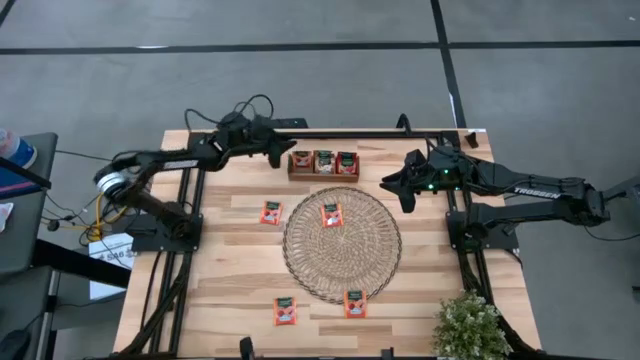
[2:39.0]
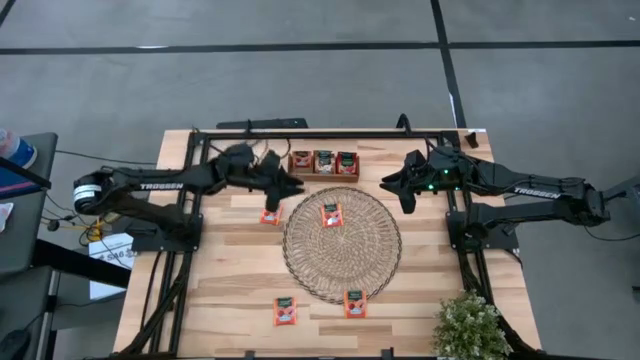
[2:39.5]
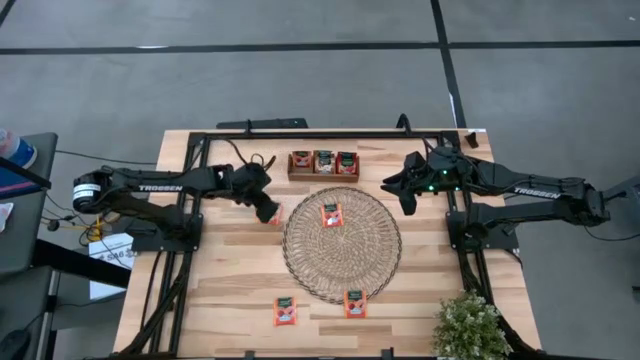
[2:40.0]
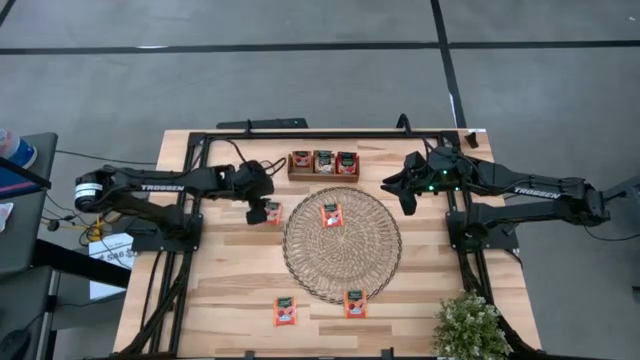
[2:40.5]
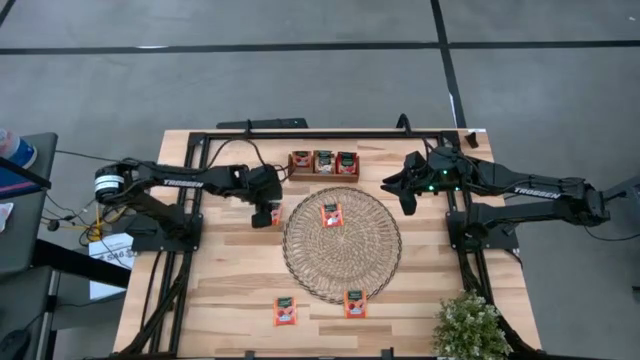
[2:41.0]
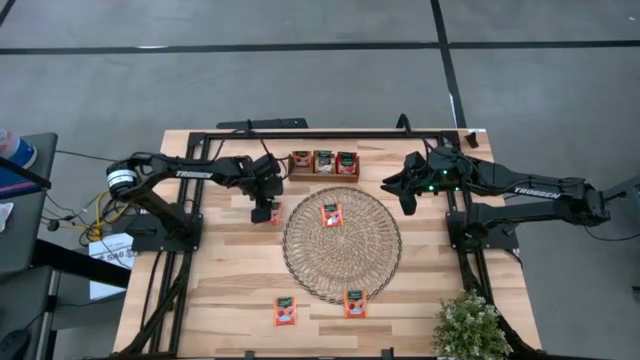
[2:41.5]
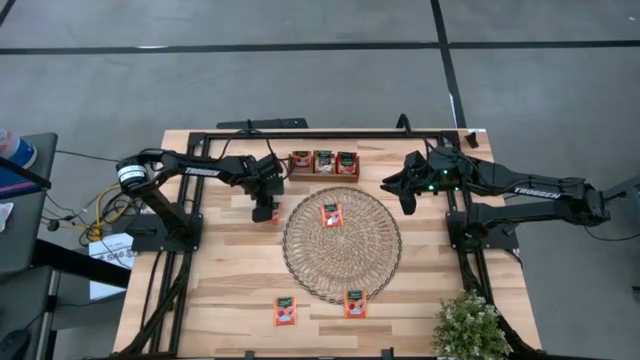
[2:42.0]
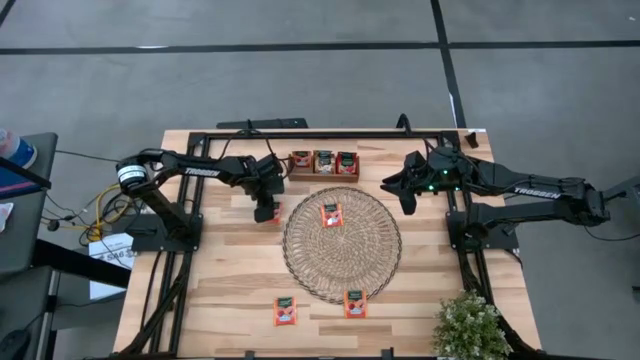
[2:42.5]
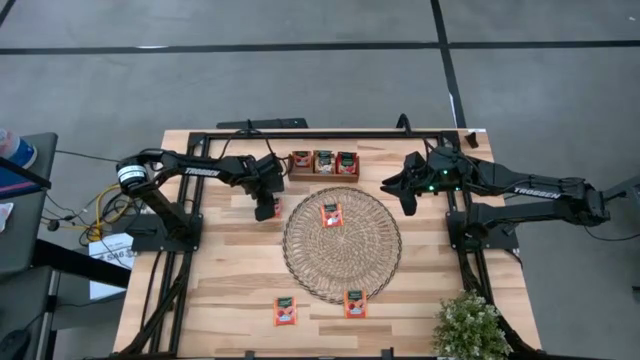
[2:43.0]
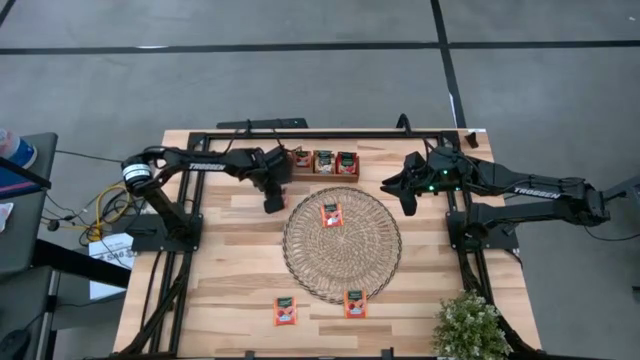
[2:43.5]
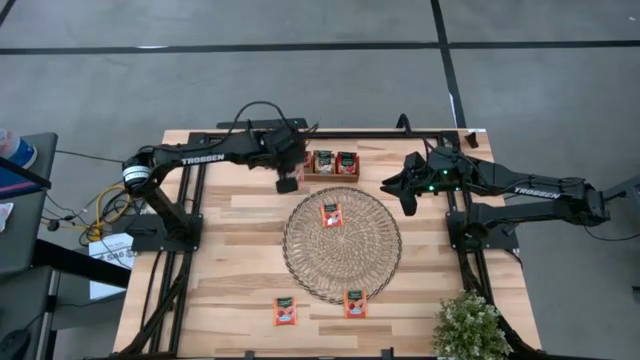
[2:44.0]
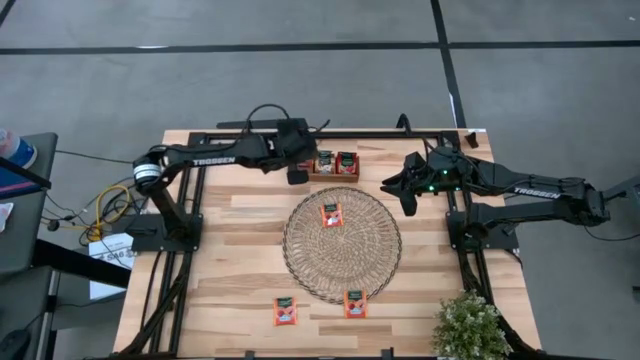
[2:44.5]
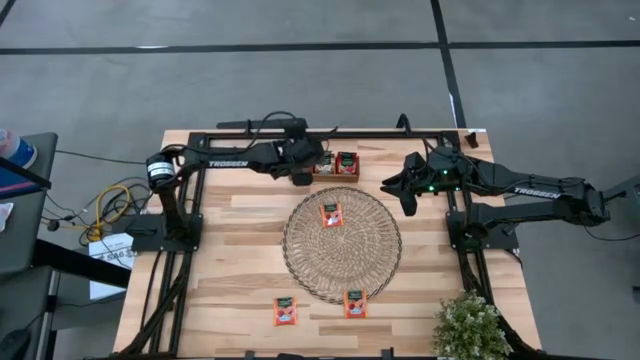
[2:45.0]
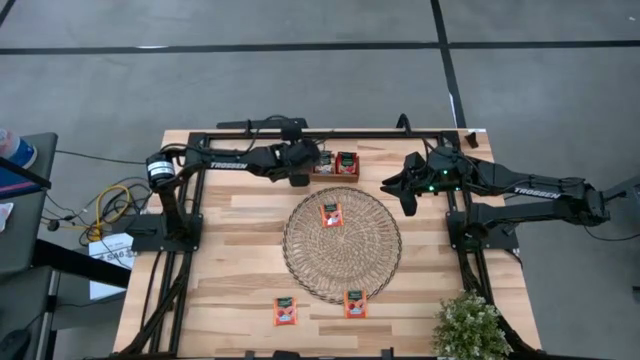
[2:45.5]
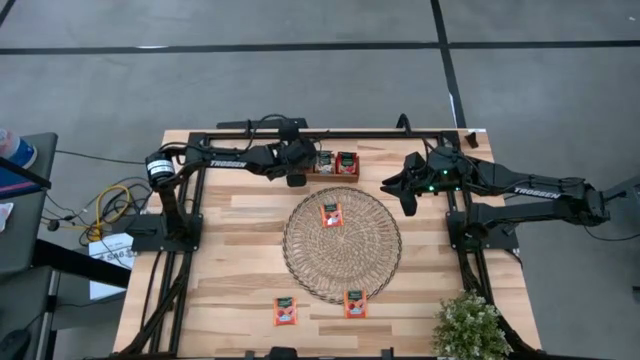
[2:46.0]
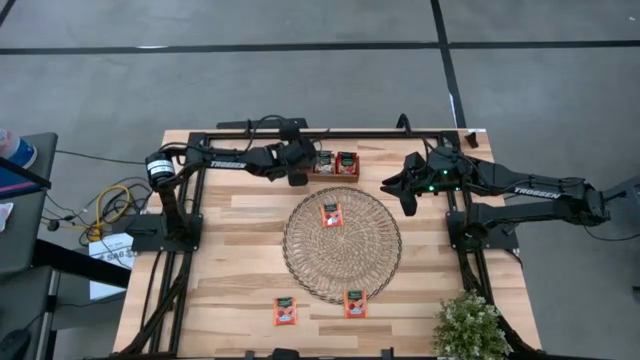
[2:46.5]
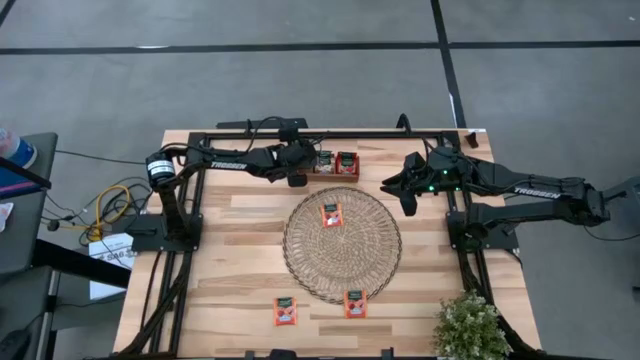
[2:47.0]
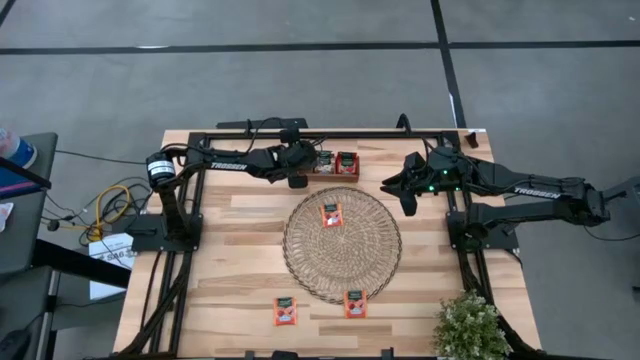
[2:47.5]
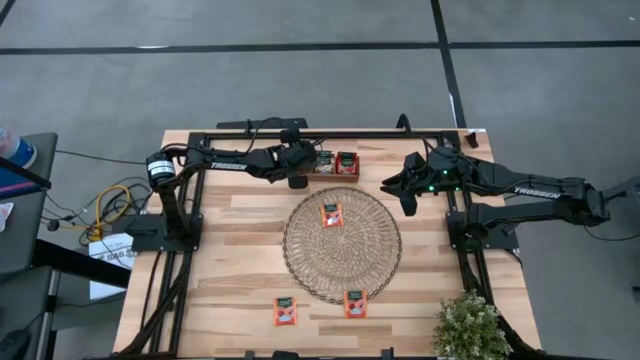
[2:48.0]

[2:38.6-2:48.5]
Task: Pick & Place Tea
Put the orange tea bag into the left section of the brown wooden organizer

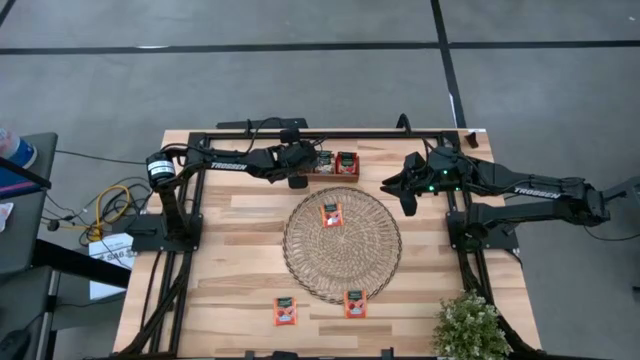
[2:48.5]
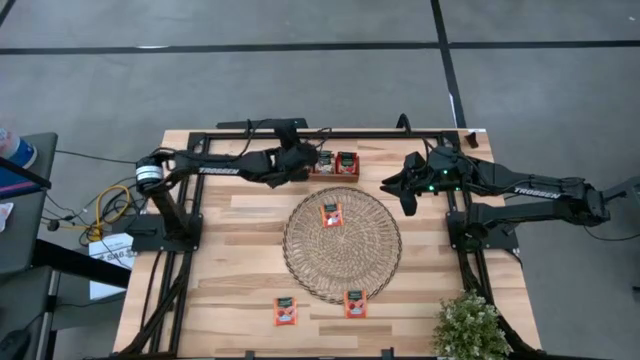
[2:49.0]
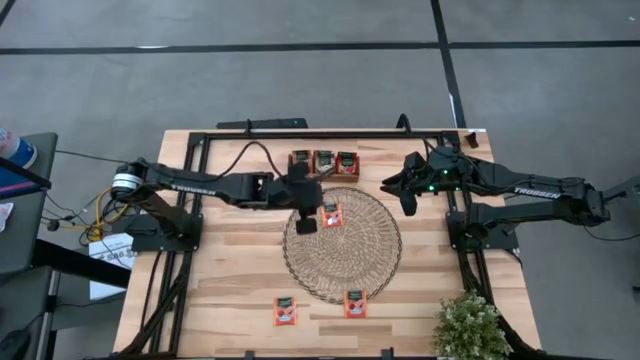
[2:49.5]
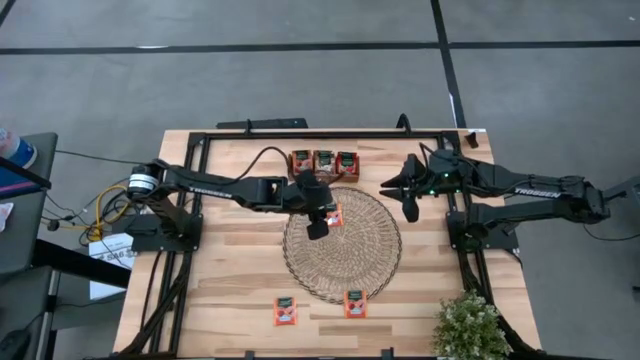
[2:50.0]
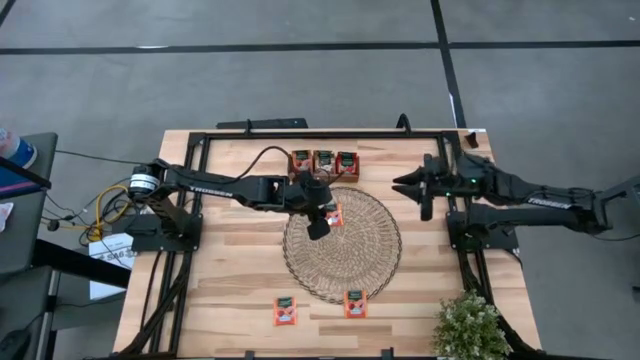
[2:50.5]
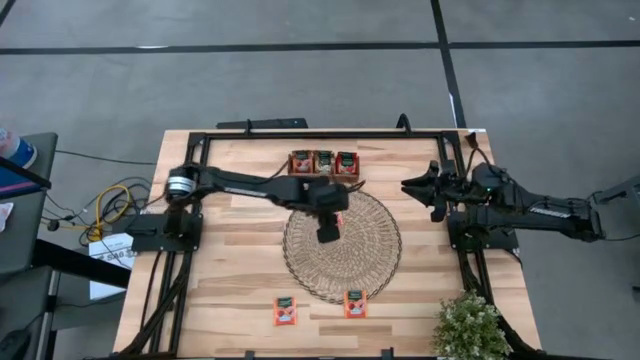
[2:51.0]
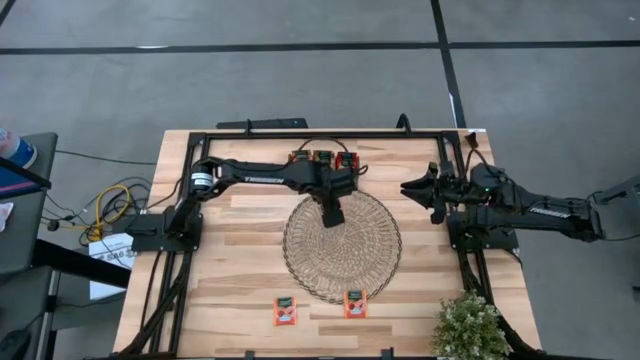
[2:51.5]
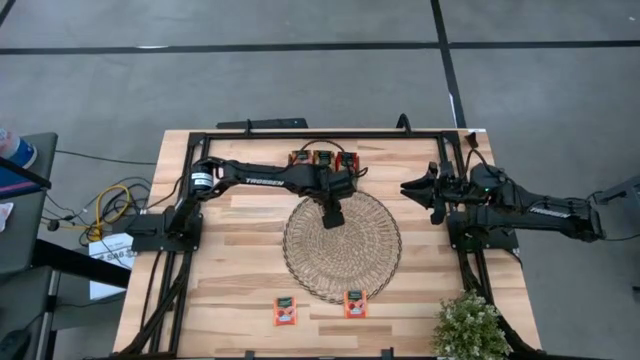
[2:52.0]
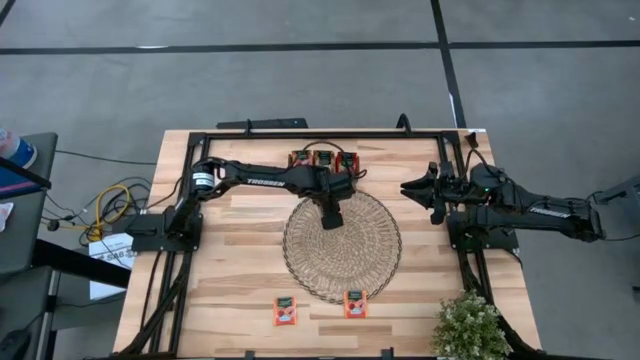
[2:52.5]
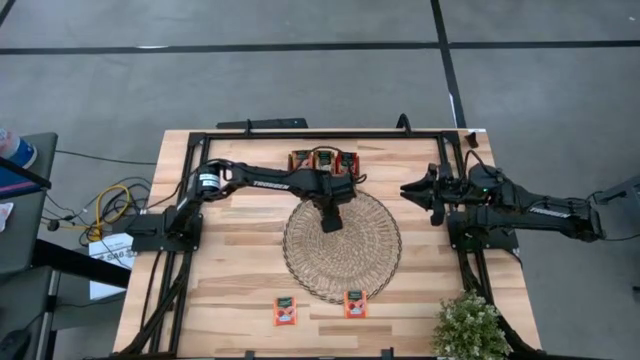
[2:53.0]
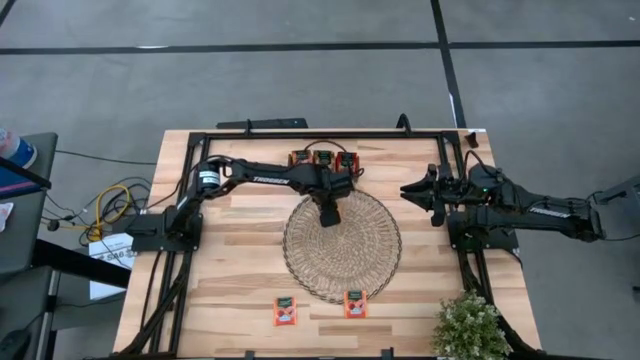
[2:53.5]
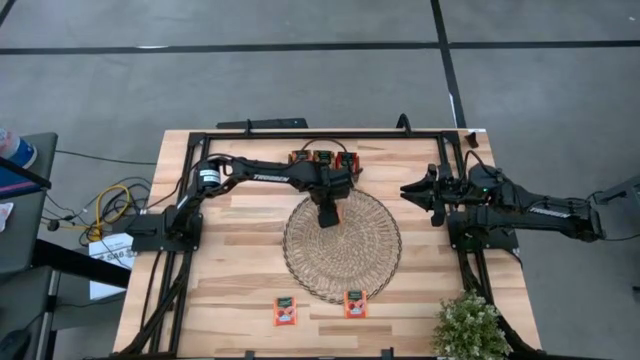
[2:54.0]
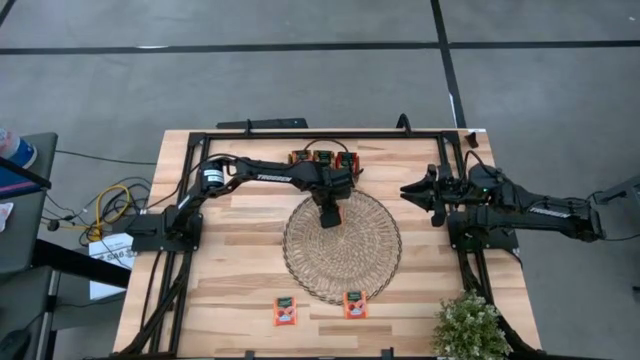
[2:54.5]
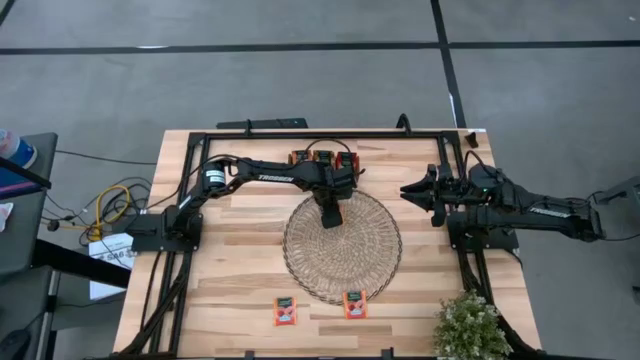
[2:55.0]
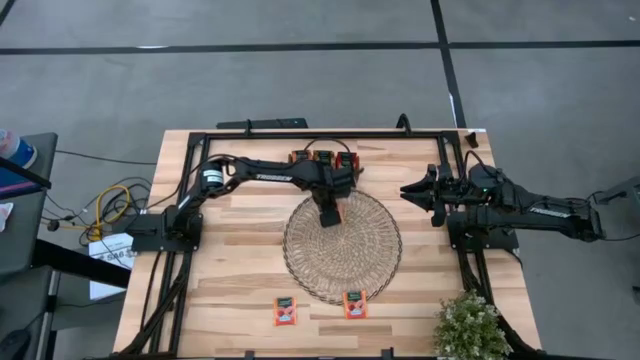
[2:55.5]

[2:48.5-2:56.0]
Put the orange tea bag into the left section of the brown wooden organizer

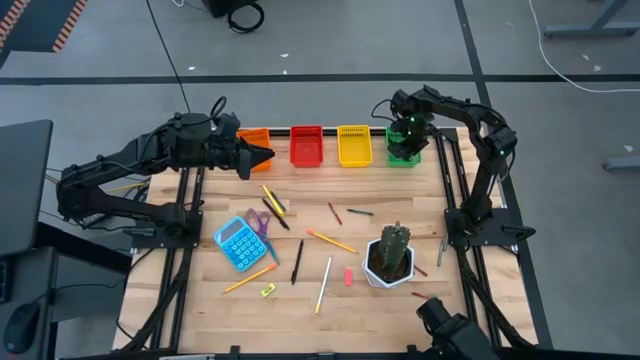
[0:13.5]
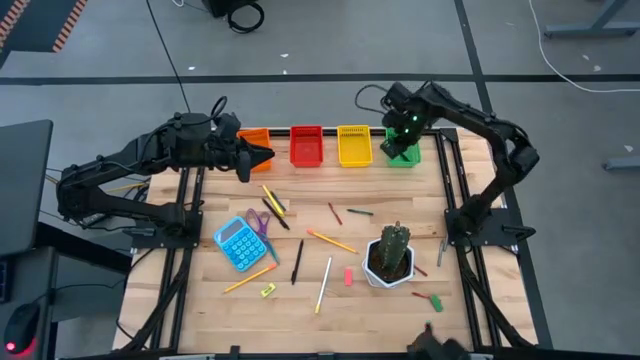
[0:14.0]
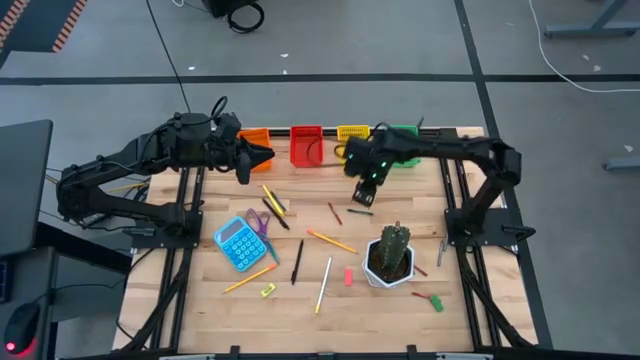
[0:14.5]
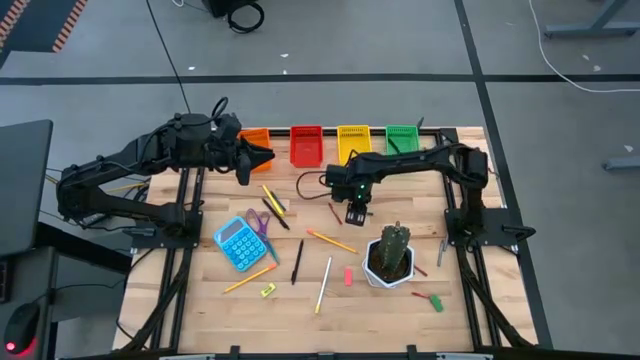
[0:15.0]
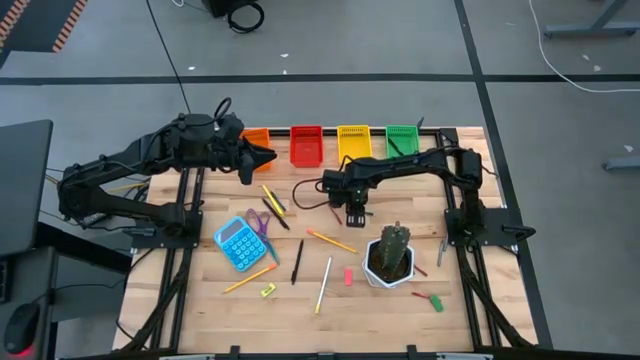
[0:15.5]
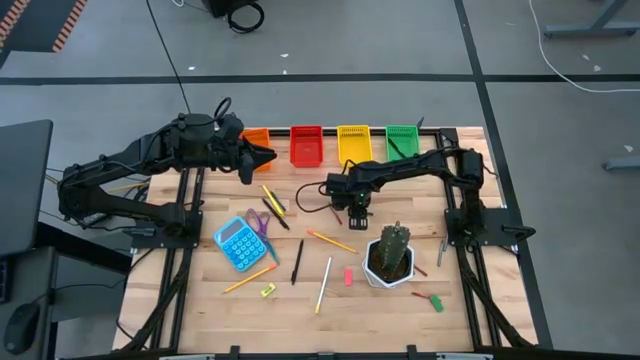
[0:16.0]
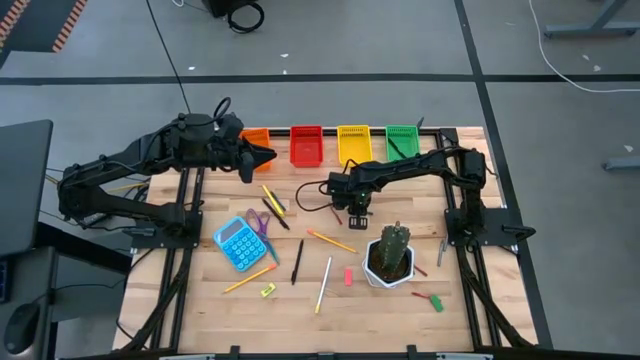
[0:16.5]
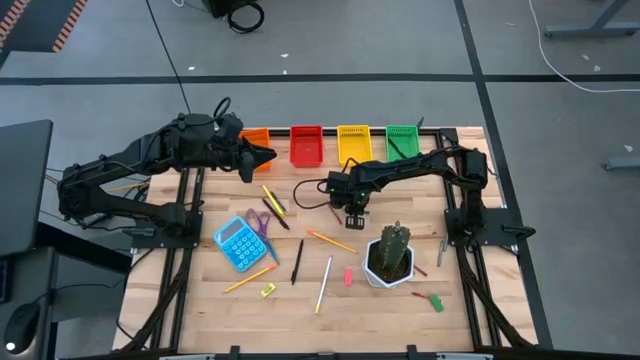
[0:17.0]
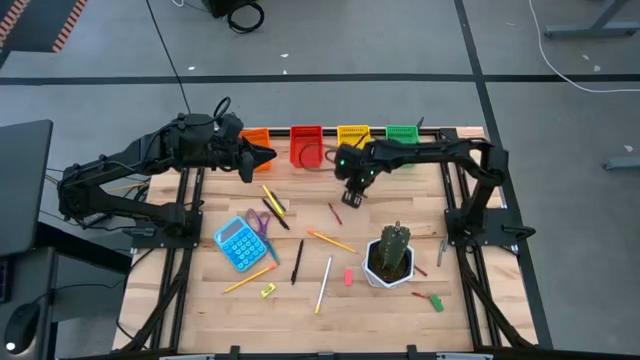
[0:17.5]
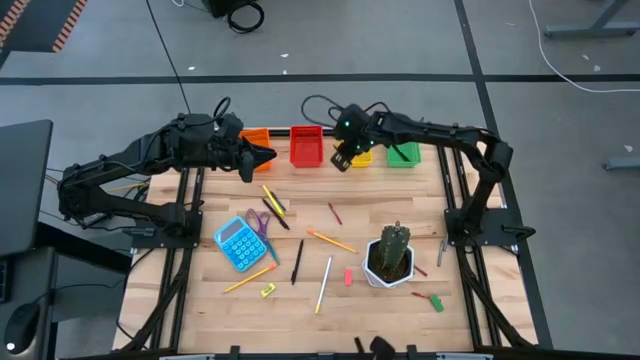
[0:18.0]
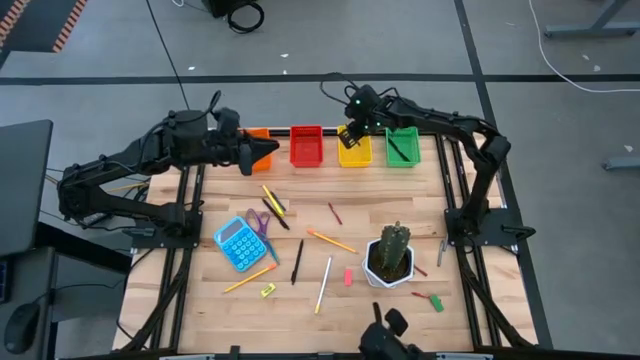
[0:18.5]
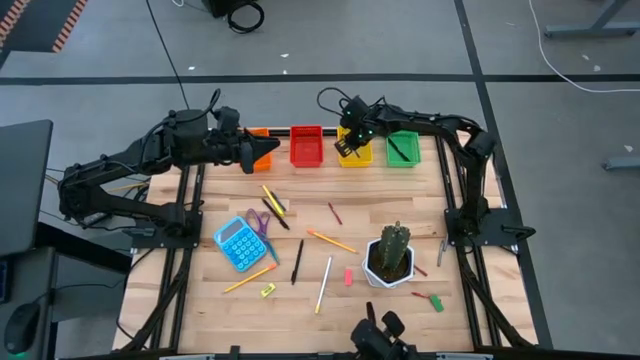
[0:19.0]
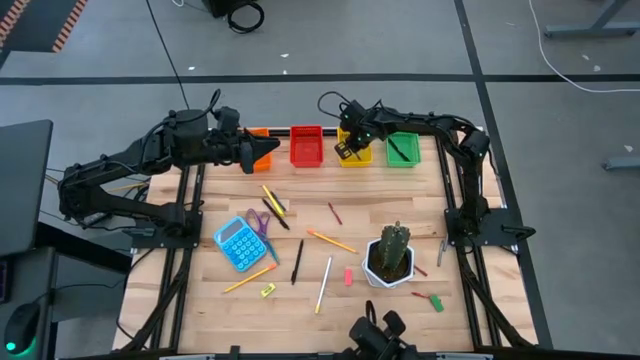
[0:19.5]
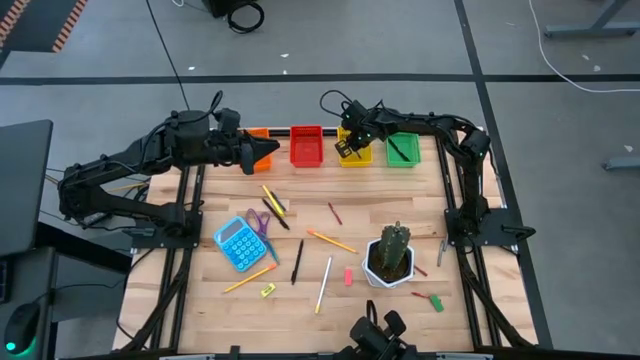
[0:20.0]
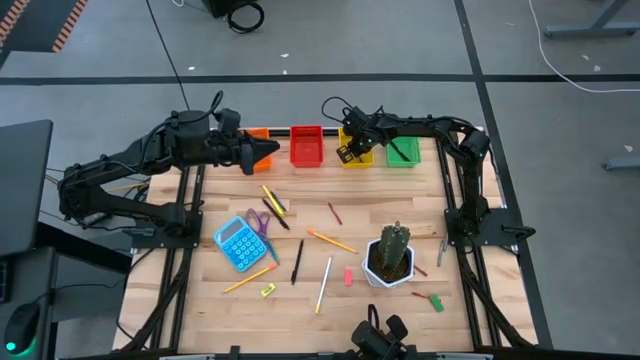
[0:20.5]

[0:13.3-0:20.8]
Task: Sort crayons/erasers/pens/pencils in bins
Put the right green crayon into the yellow bin
